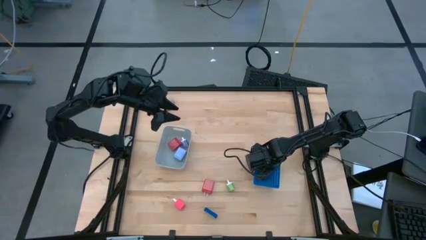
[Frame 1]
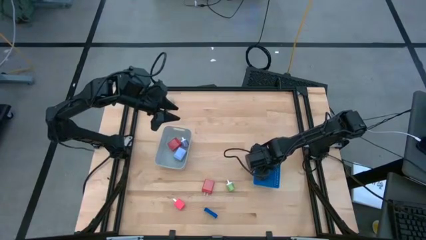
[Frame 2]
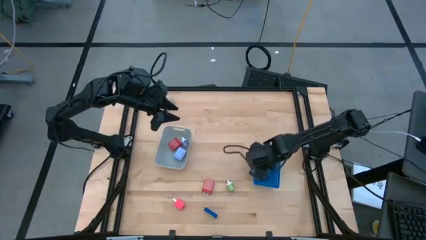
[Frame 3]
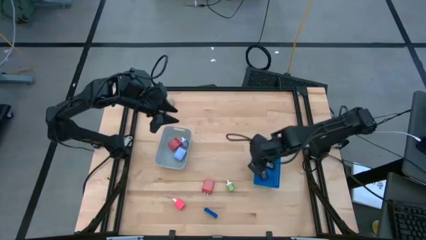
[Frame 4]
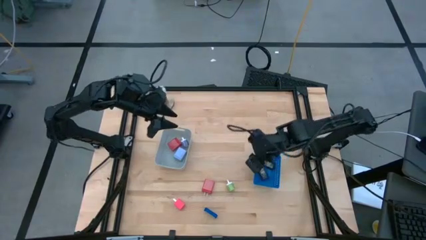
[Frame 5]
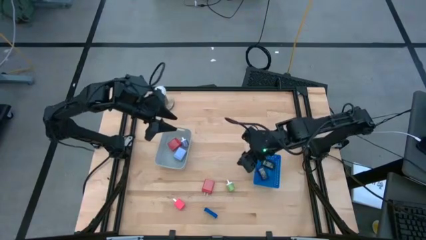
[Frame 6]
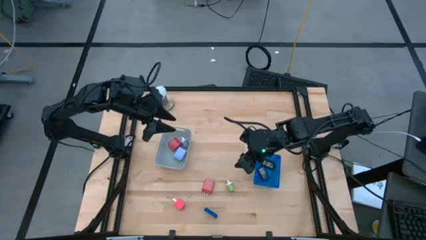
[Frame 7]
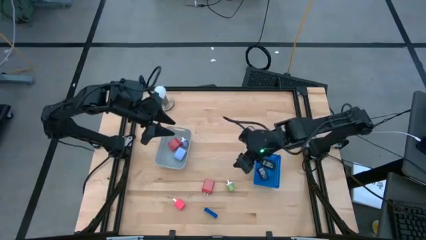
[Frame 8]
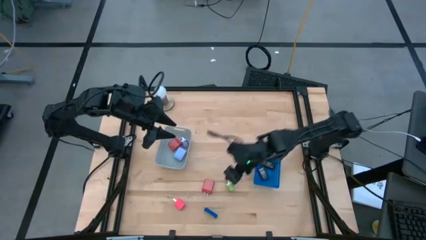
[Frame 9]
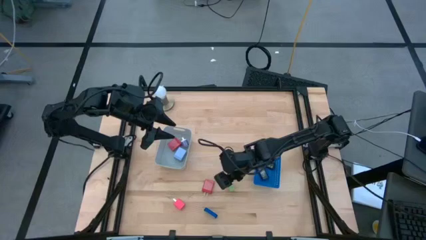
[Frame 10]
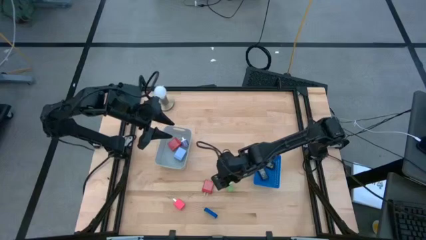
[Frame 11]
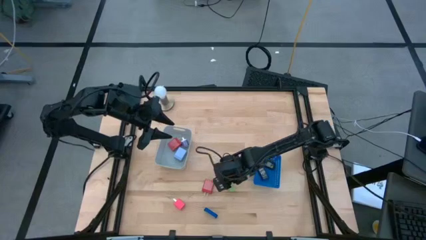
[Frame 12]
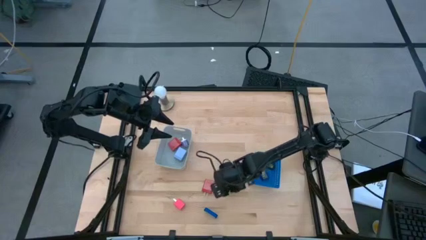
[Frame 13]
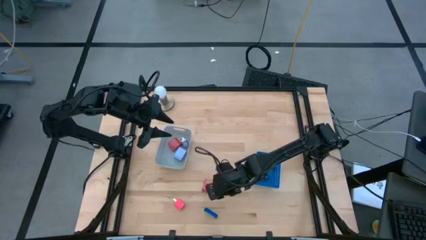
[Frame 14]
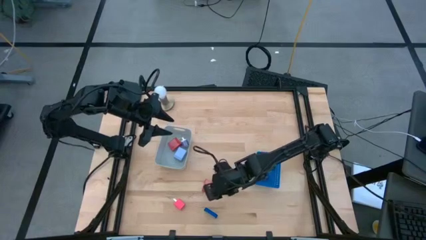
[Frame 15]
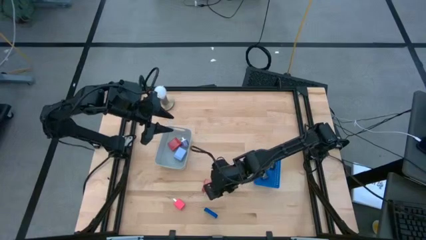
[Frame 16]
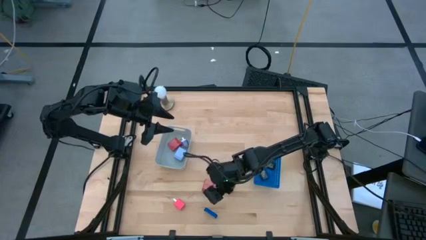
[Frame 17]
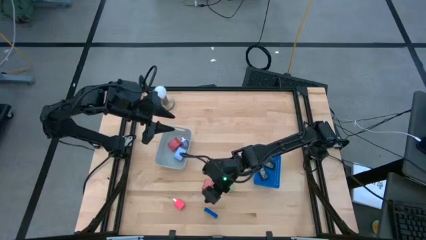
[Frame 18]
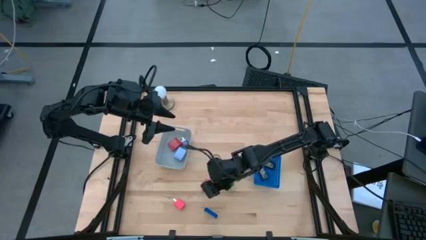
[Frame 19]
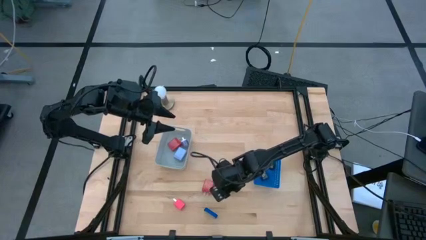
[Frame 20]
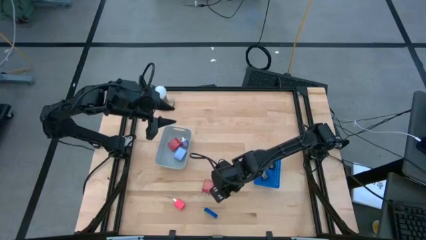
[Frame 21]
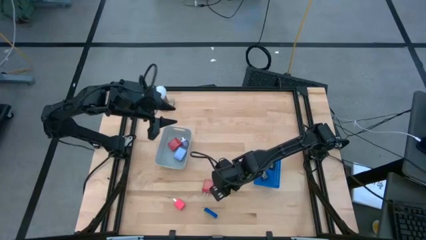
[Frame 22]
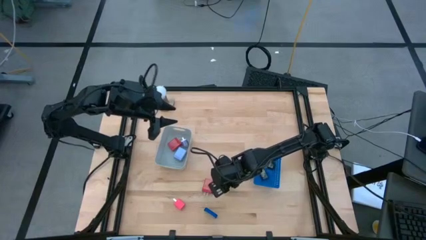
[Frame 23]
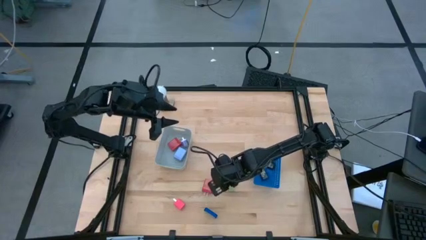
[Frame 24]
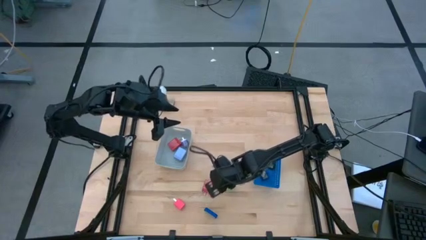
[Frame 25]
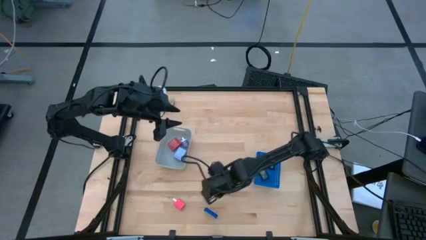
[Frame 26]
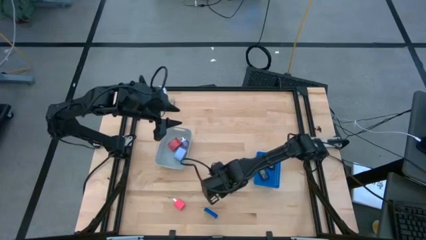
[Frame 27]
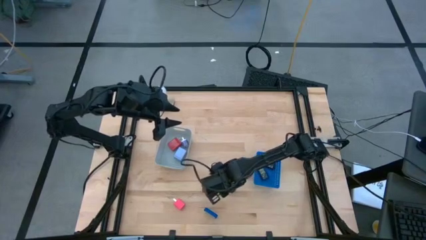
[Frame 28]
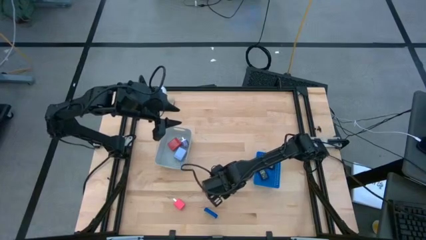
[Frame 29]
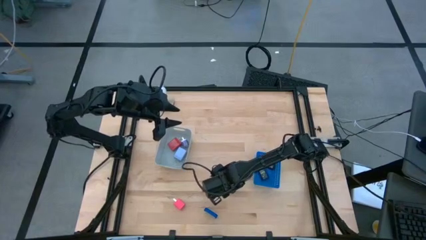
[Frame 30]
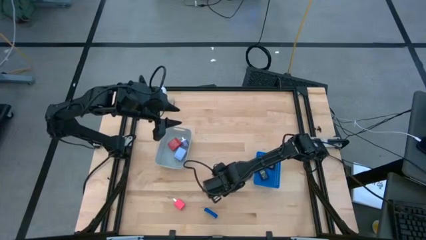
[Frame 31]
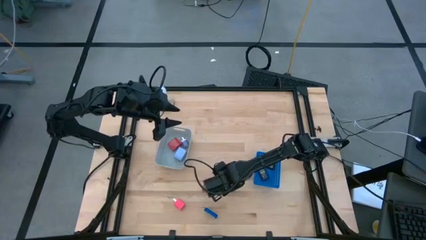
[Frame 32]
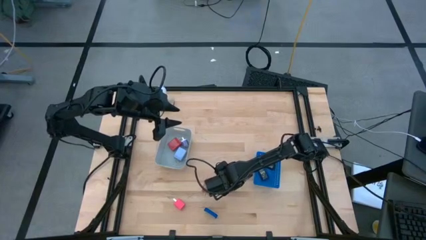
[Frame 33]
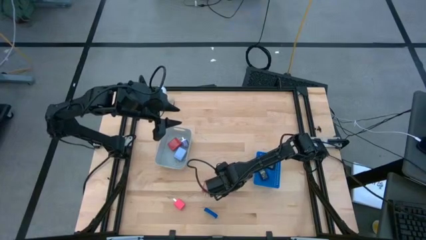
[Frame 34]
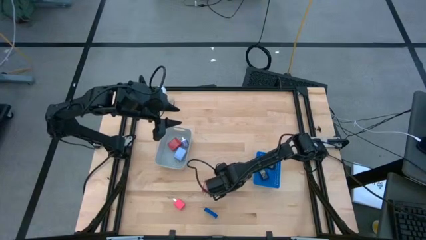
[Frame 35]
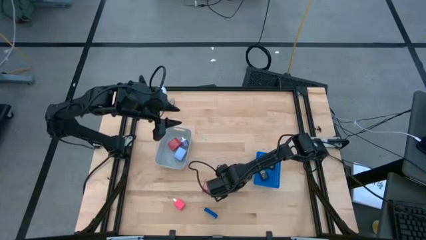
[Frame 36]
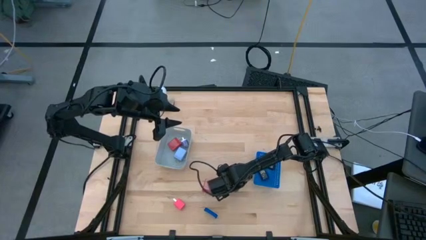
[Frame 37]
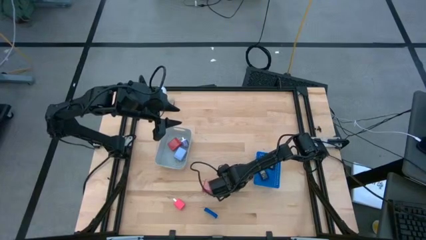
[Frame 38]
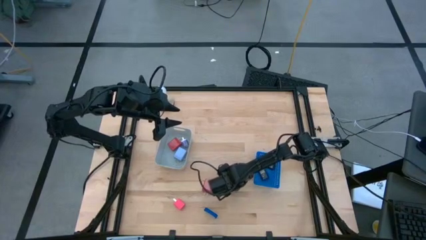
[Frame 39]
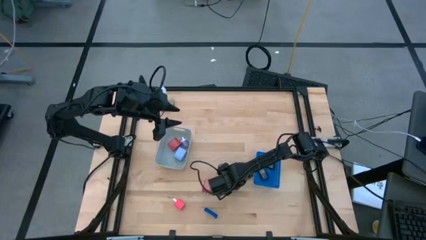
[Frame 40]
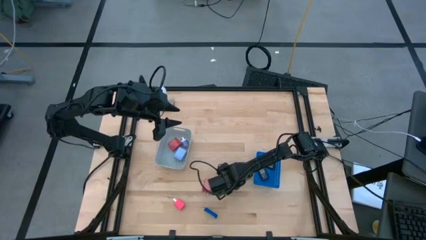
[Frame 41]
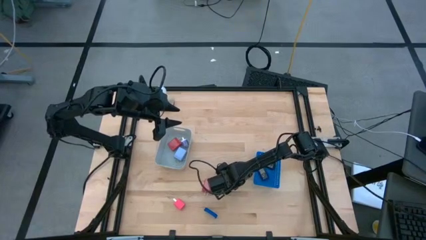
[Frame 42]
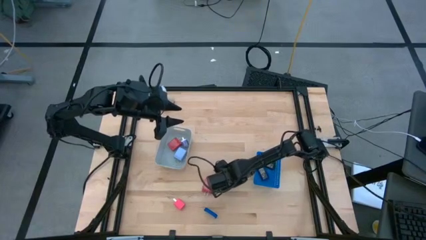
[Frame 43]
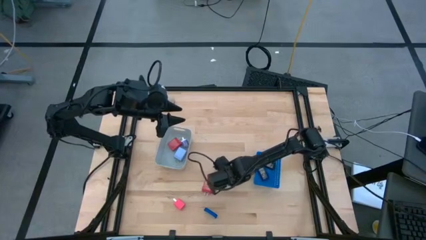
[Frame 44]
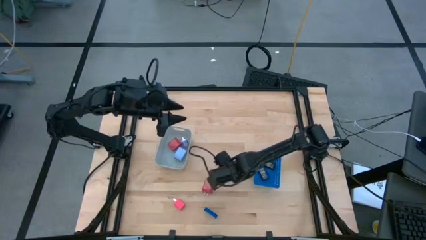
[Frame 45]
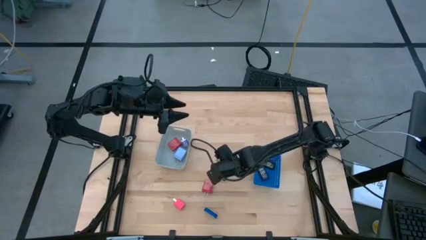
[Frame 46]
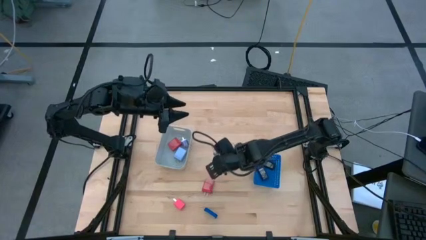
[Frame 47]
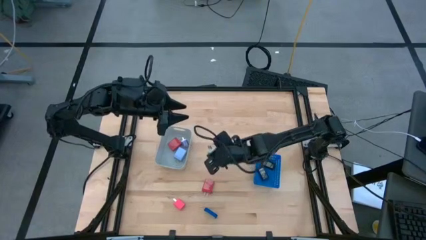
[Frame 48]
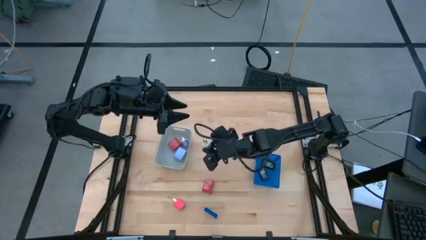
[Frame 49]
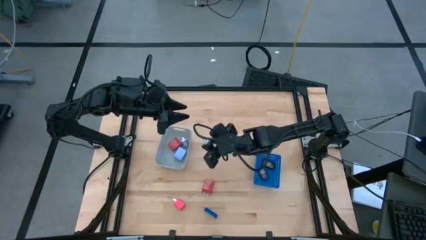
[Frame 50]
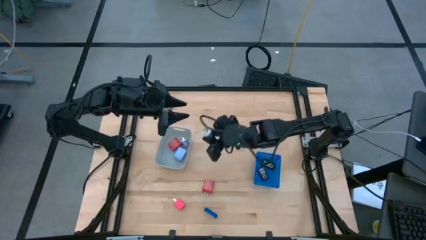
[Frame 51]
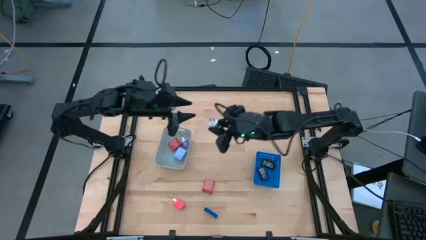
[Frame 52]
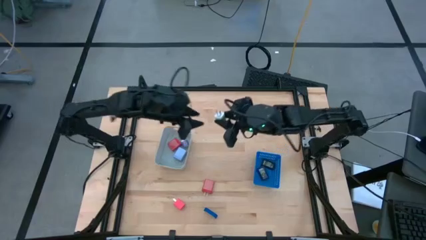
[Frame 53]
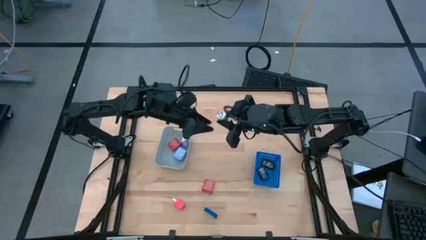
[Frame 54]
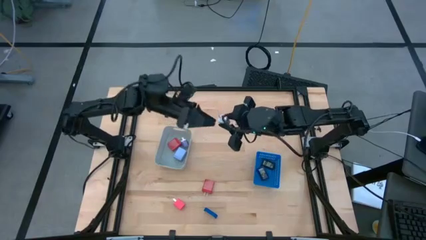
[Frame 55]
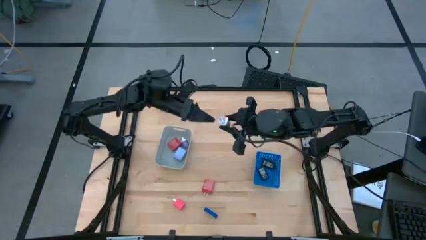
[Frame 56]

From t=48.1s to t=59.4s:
Task: Pick & Place Office items
Put the green charger adapter into the gray bin

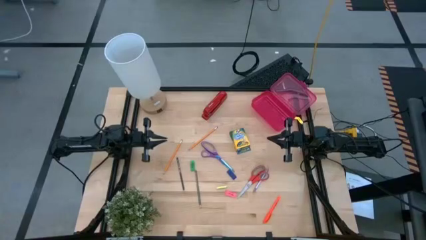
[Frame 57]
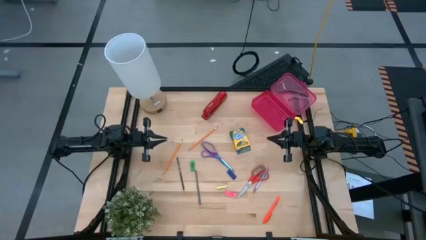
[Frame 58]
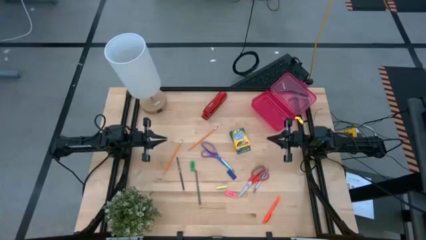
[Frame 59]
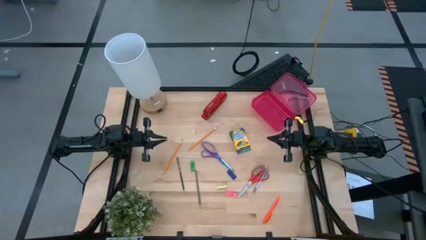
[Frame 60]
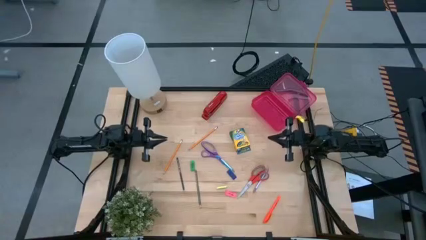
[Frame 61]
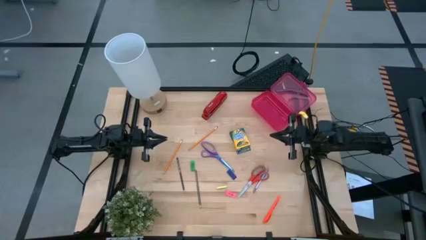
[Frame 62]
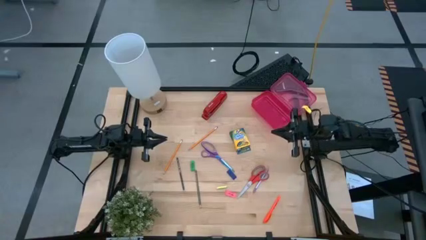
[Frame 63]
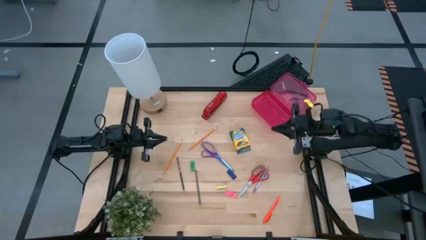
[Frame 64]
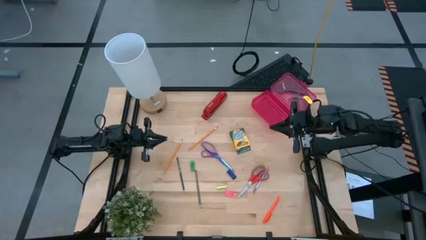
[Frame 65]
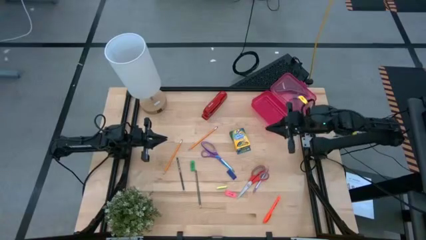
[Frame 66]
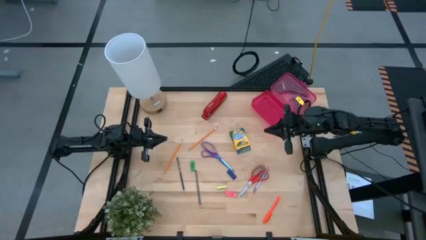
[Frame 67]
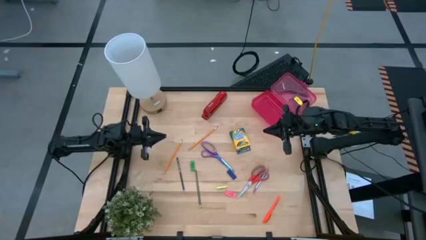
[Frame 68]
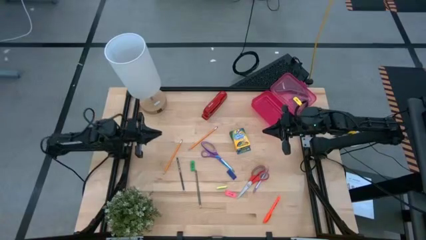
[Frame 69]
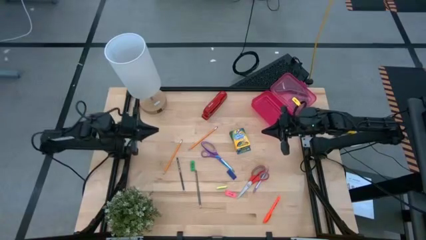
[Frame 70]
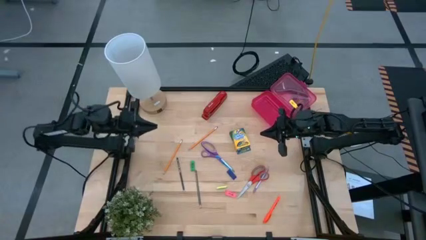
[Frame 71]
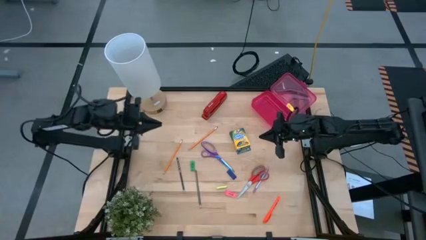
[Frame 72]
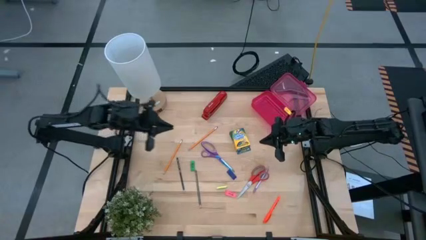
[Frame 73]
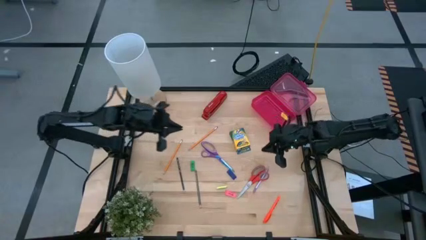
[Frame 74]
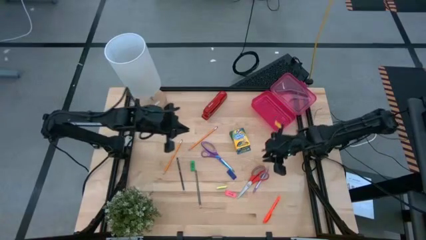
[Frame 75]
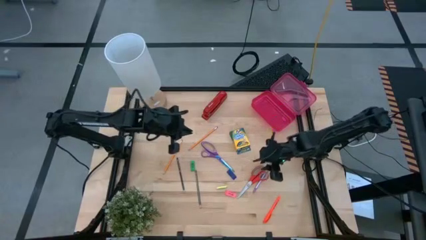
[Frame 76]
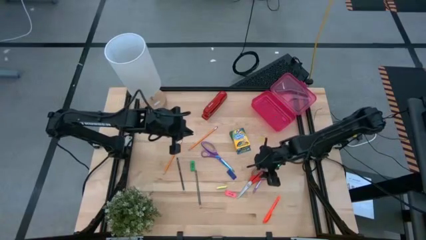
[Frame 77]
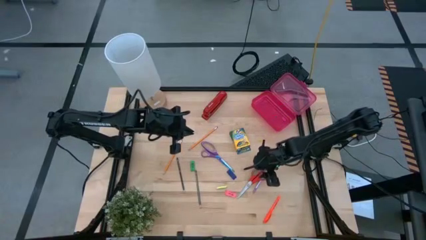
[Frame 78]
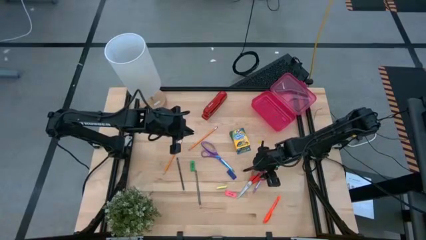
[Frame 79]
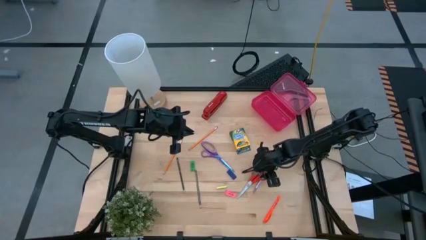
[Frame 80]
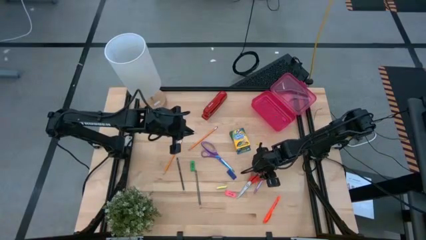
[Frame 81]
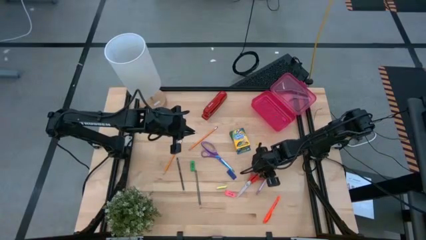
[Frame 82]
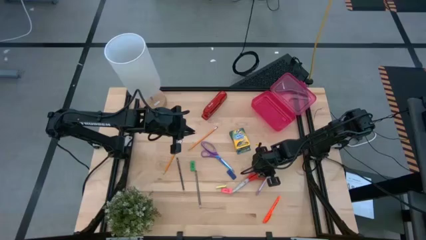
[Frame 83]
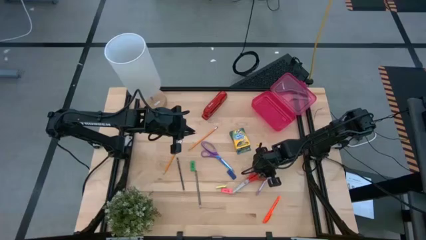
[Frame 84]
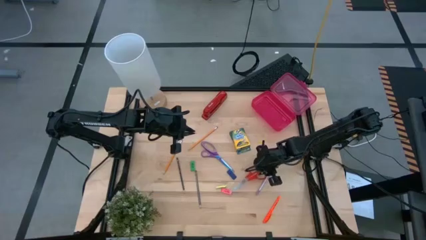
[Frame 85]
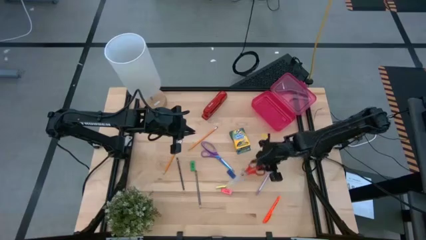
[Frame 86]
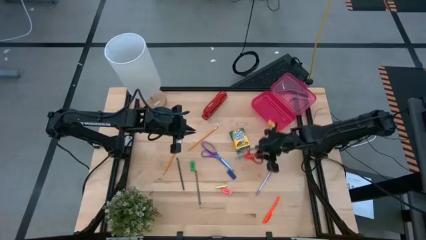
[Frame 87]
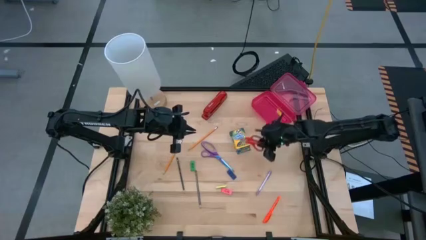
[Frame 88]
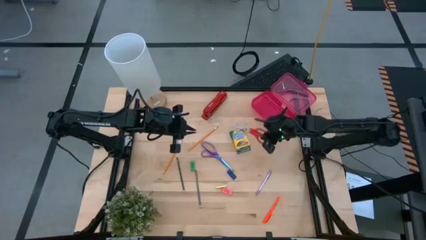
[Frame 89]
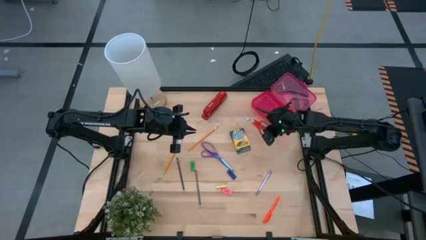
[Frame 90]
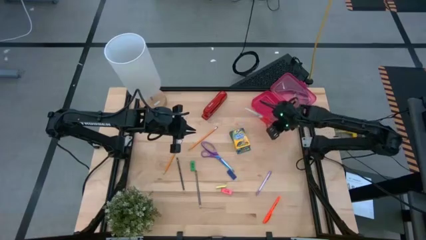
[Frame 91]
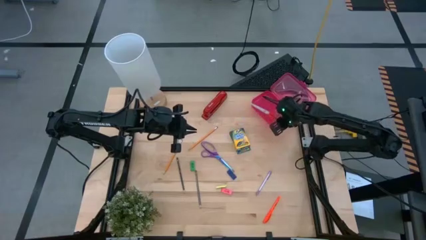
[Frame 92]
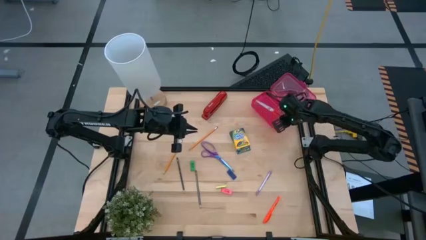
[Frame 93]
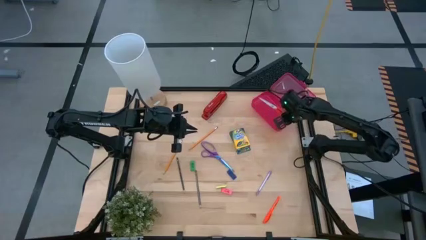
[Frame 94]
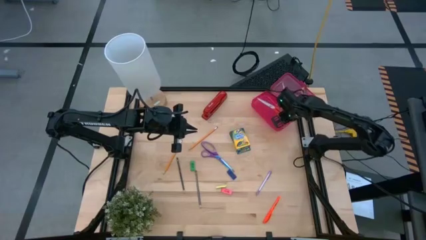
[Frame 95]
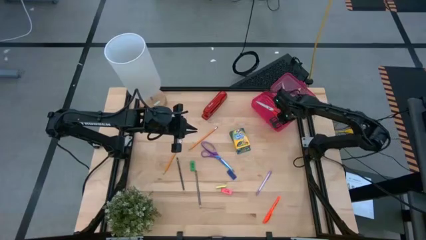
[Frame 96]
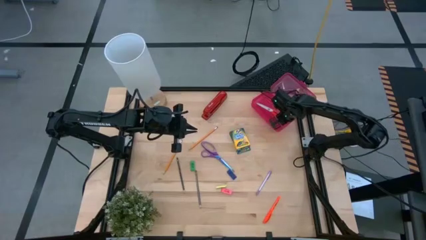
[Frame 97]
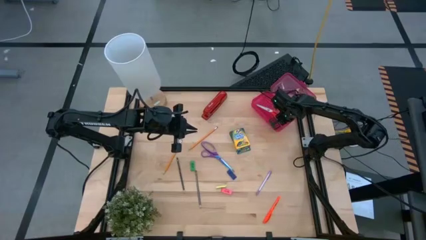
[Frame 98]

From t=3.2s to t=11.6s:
Task: Pack school essentials
Put the orange scissors into the pink supply box
